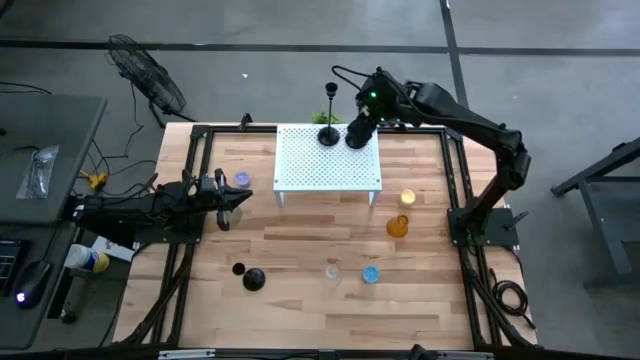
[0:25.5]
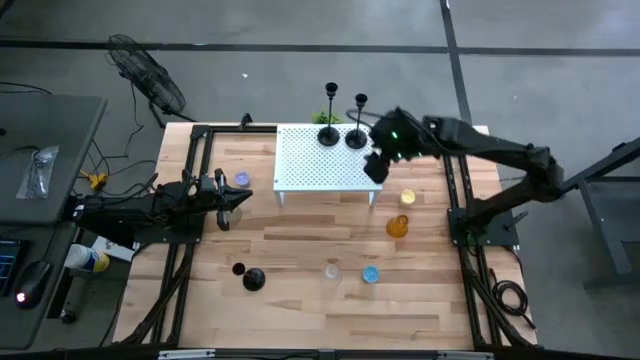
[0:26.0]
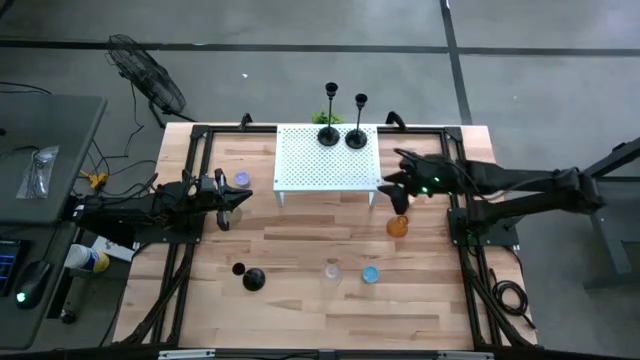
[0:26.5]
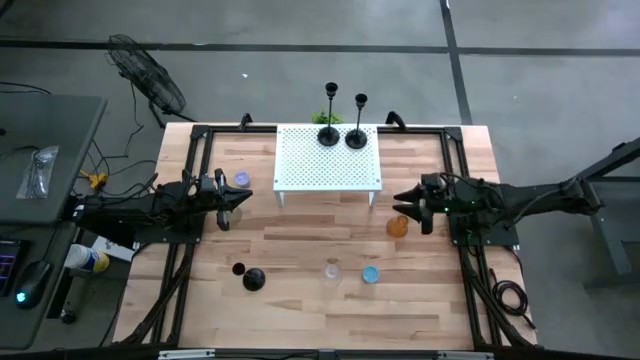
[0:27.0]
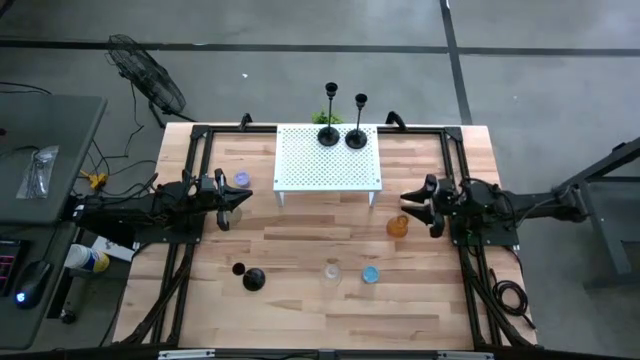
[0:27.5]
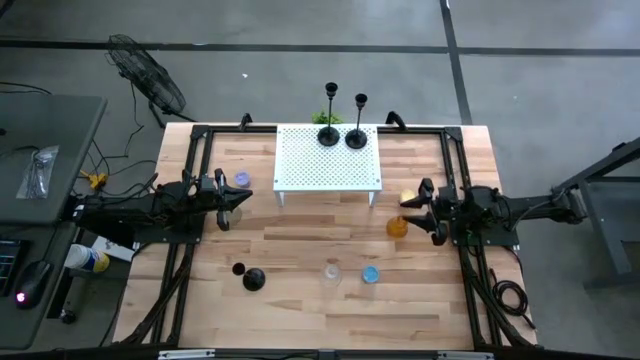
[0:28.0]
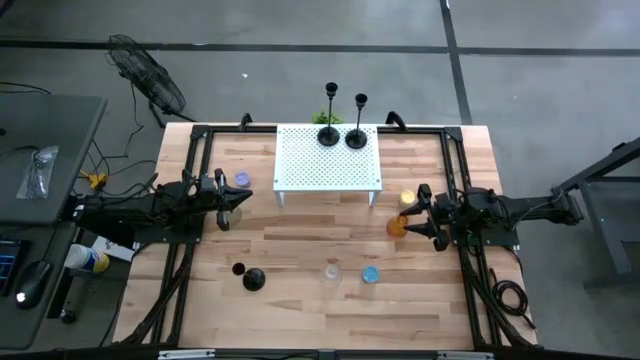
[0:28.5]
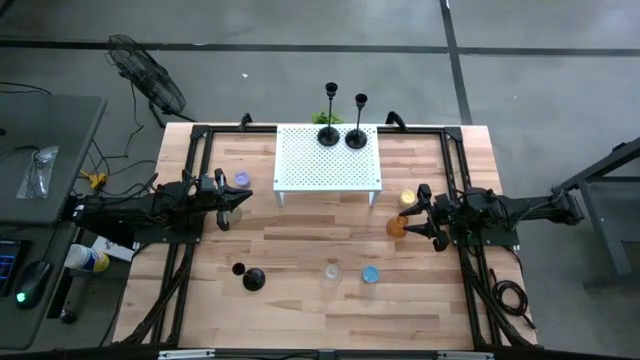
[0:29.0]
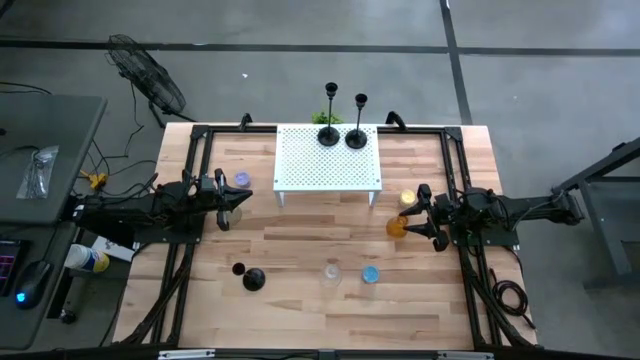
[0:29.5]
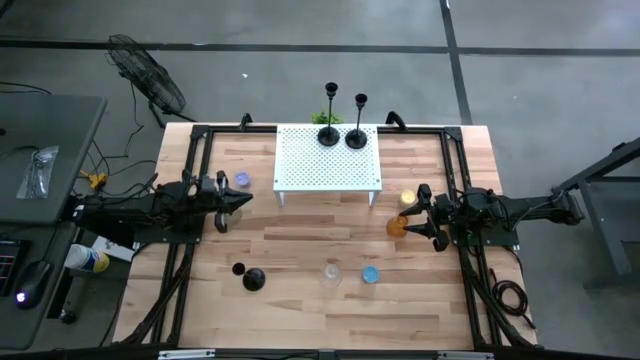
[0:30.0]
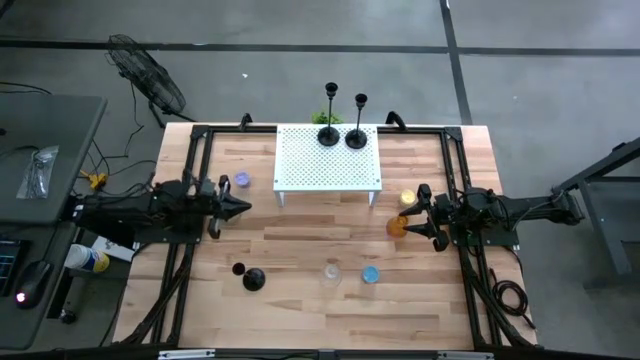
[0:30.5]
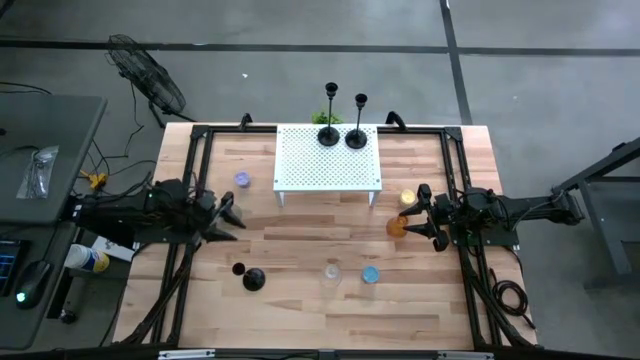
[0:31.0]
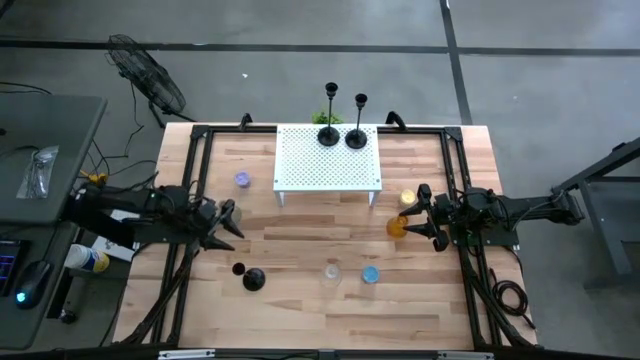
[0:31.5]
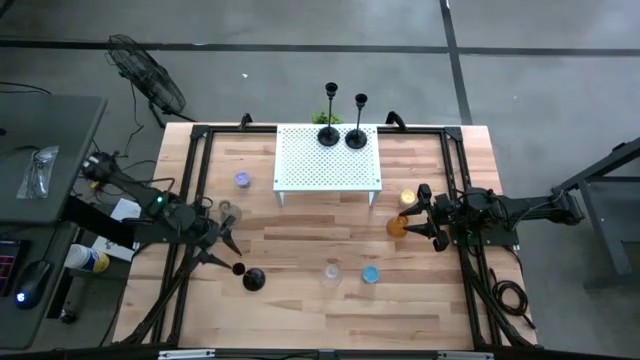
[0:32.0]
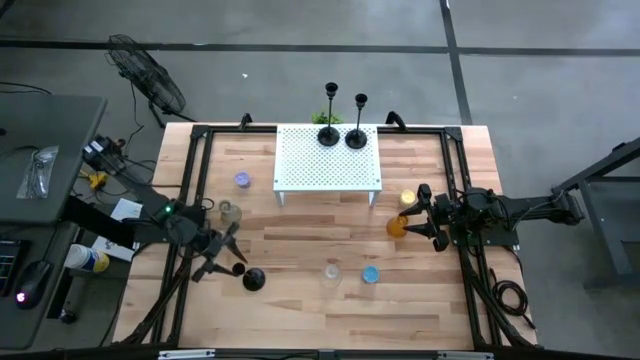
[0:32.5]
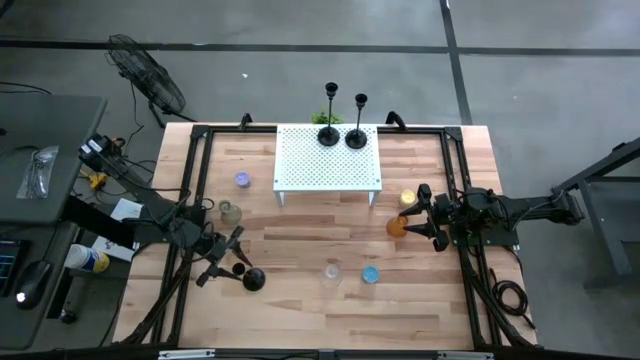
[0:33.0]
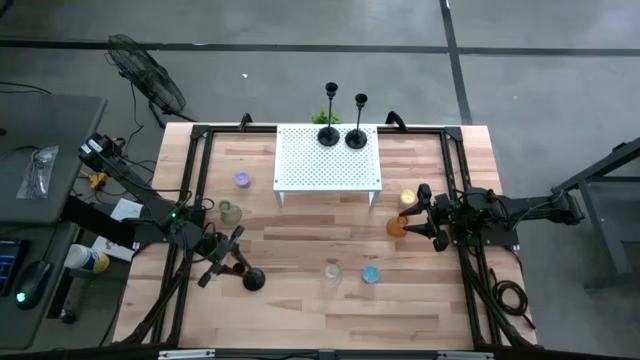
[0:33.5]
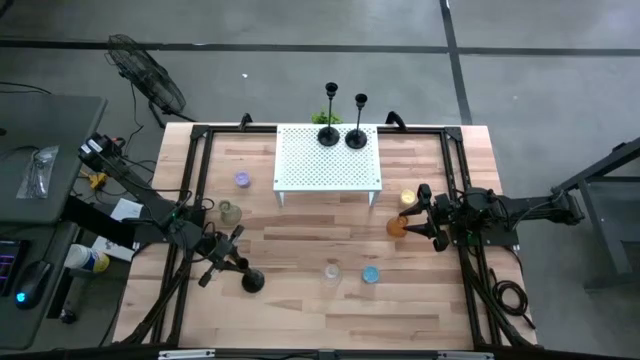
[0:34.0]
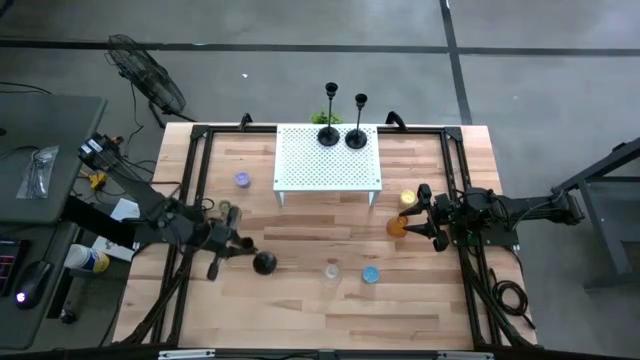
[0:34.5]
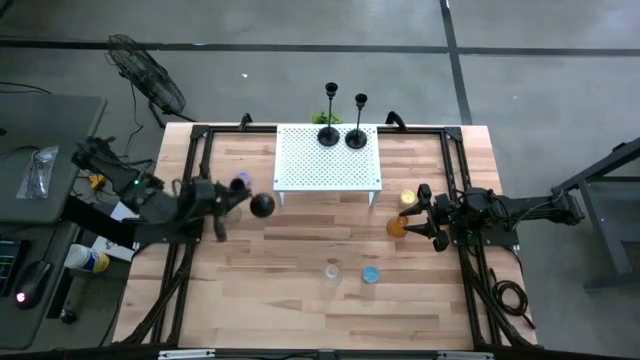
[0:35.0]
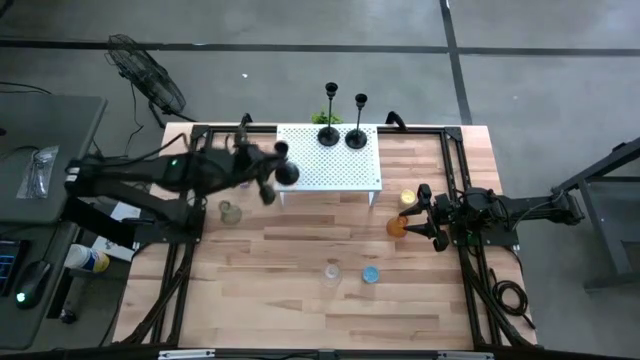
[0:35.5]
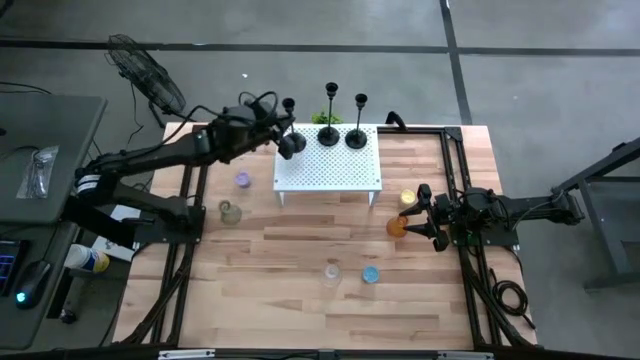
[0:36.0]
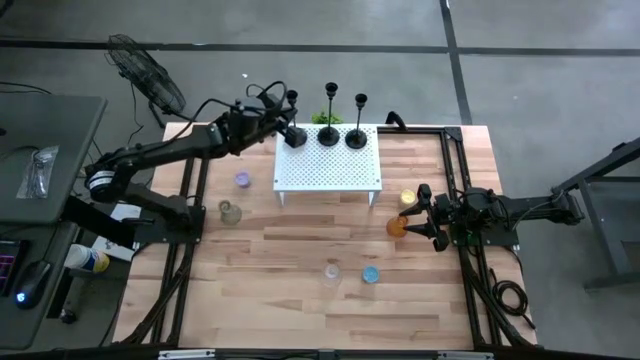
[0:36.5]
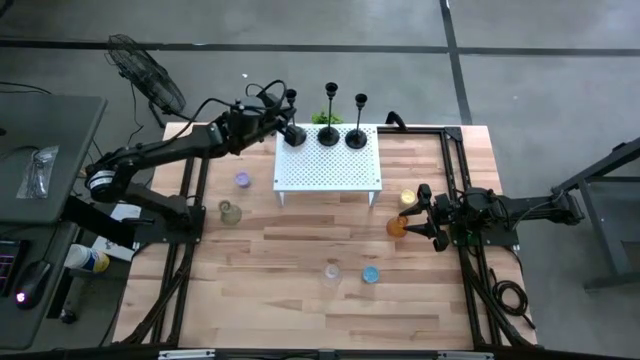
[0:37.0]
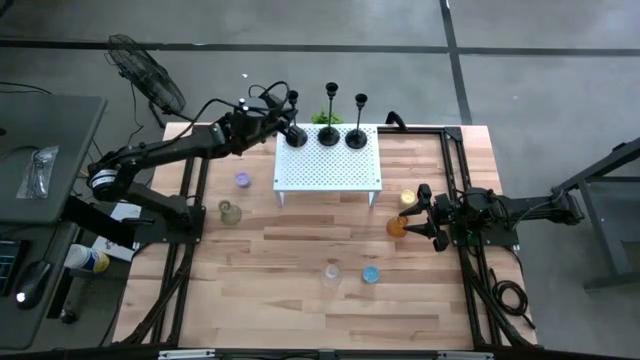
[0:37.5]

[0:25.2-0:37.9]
Task: Pick & Place candle stick holders
Put the black candle holder on the shelf aligned with the black candle holders

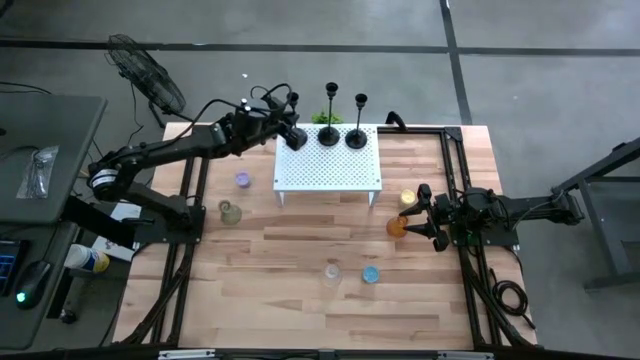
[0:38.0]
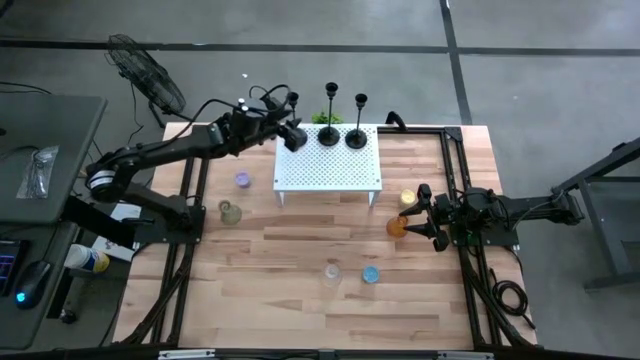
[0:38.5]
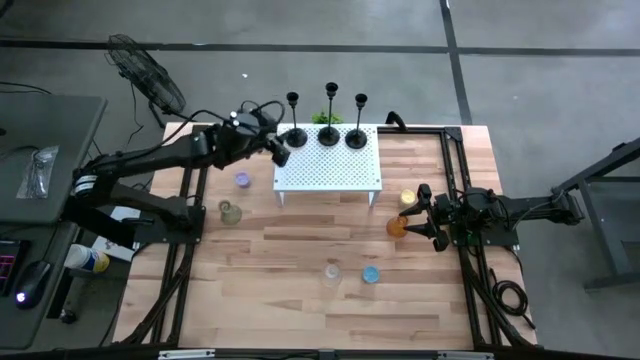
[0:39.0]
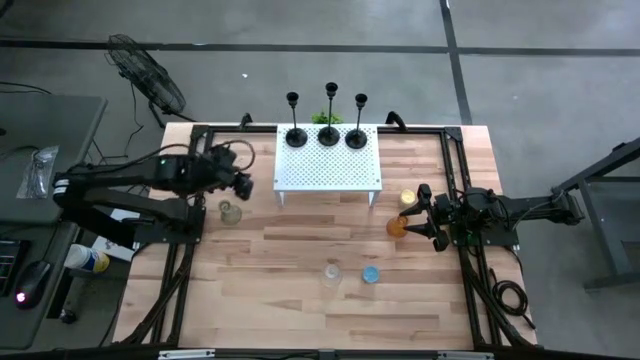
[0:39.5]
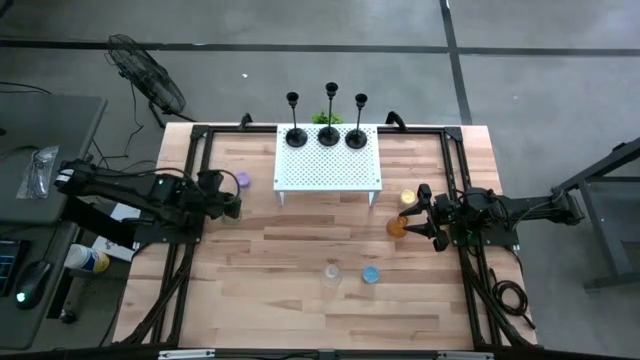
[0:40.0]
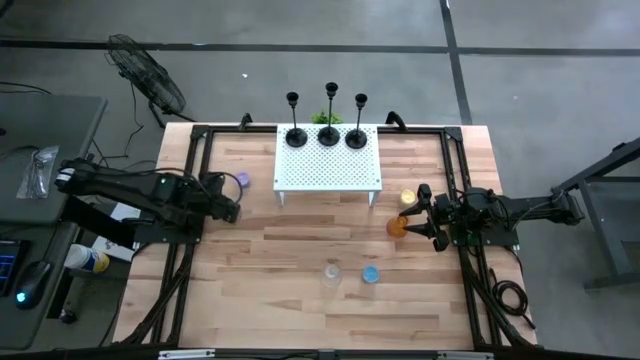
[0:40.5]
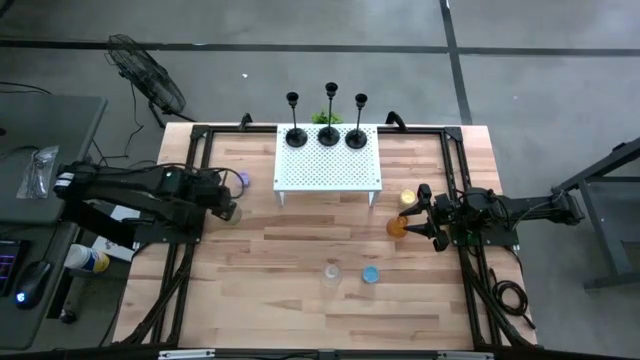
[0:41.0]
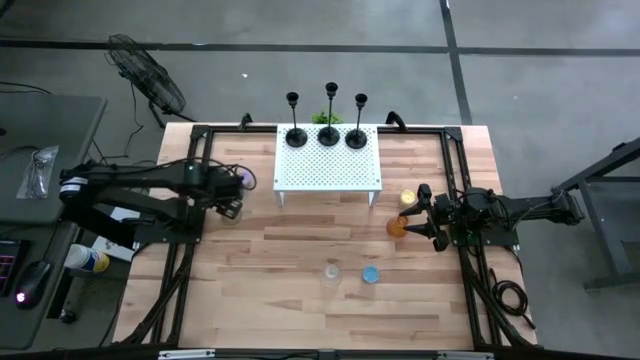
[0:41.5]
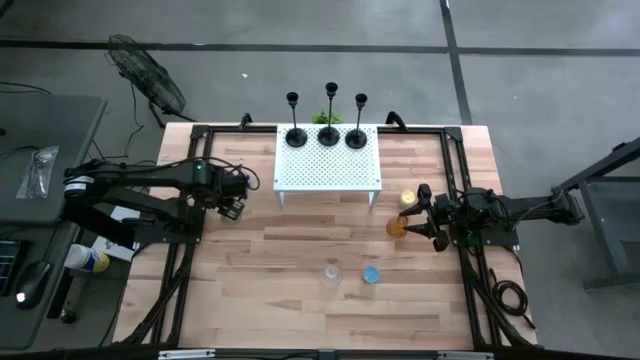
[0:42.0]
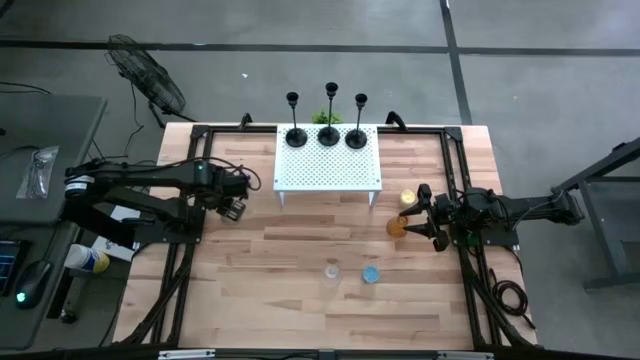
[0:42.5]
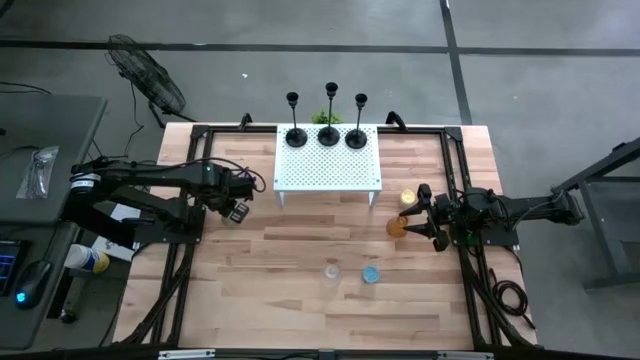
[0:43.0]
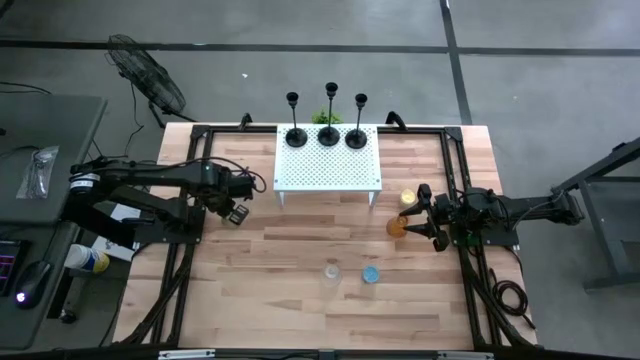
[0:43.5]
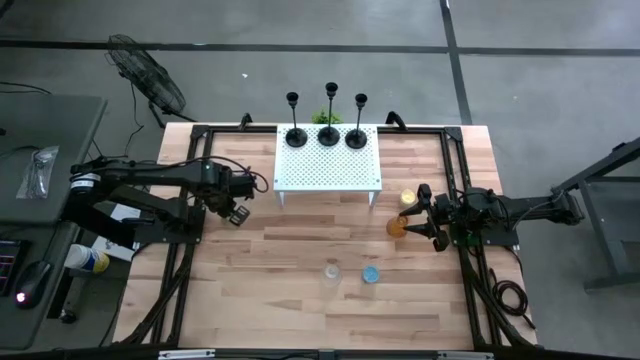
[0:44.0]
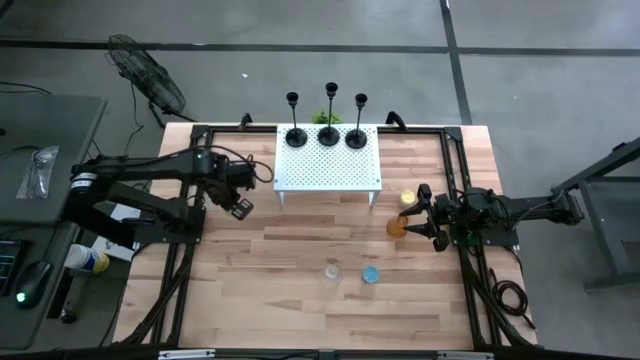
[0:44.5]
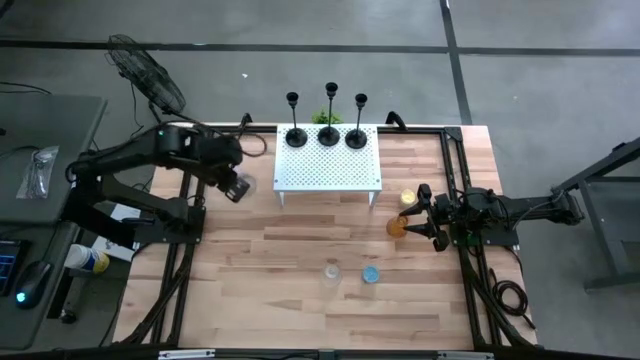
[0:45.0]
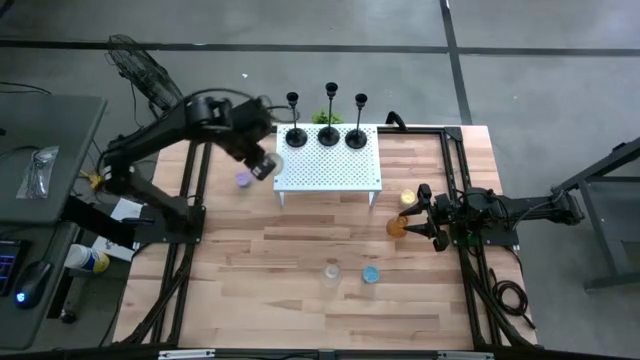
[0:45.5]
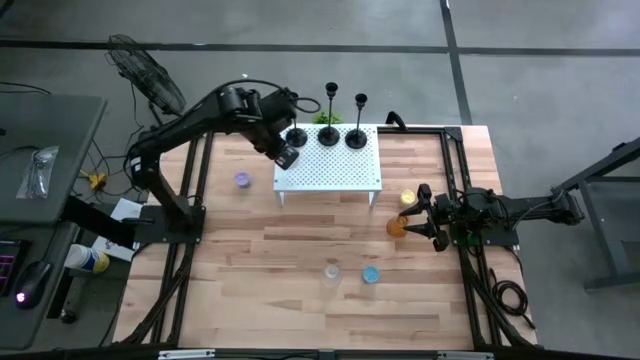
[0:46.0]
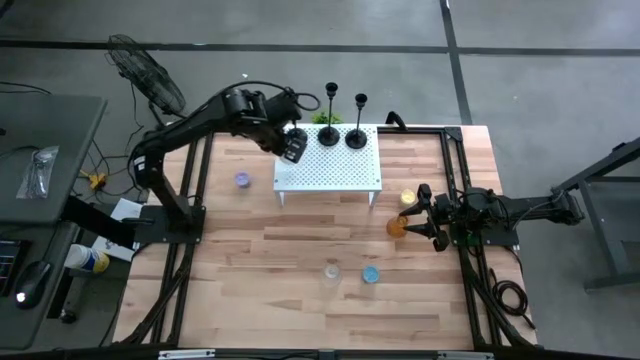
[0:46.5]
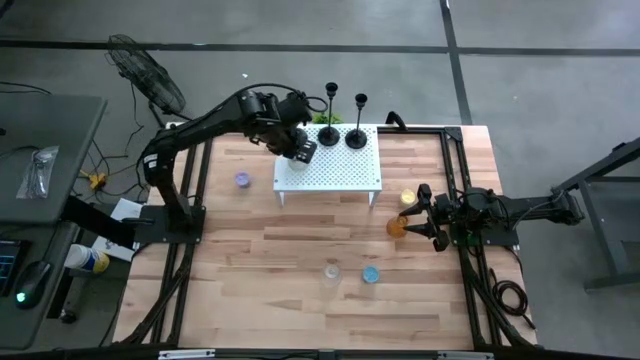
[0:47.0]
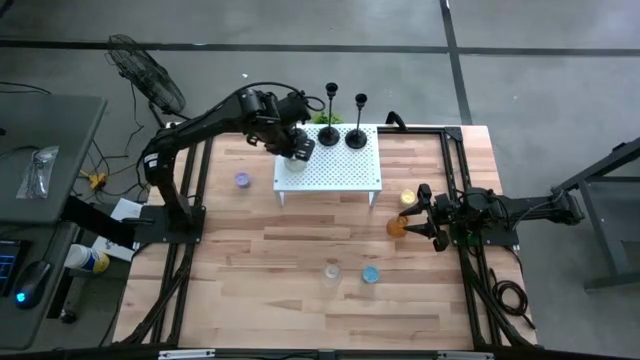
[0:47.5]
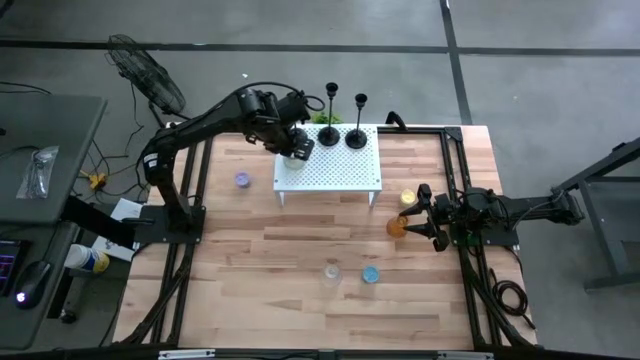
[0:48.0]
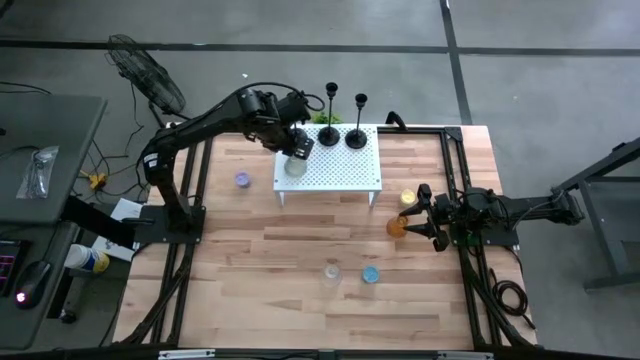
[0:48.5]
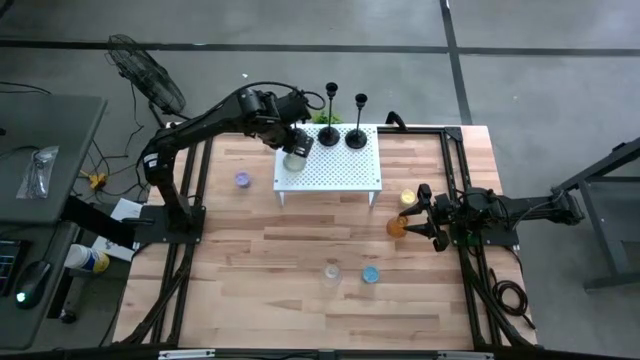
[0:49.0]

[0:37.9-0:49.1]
Put the green candle holder on the shelf
